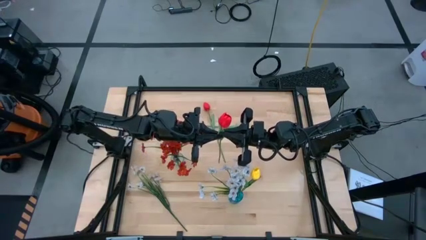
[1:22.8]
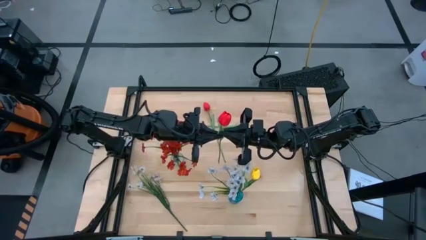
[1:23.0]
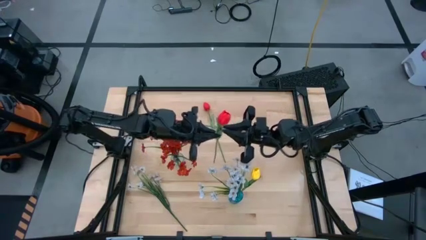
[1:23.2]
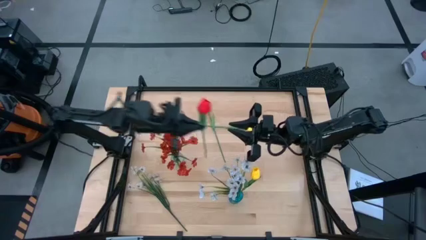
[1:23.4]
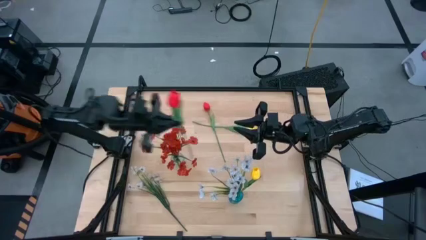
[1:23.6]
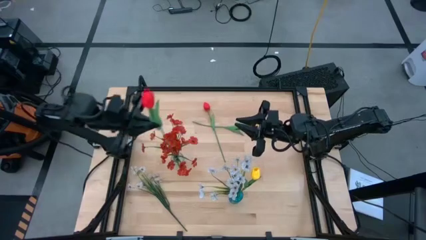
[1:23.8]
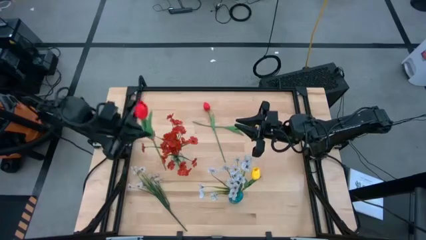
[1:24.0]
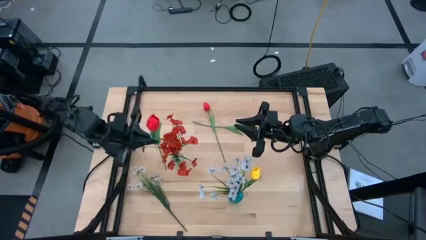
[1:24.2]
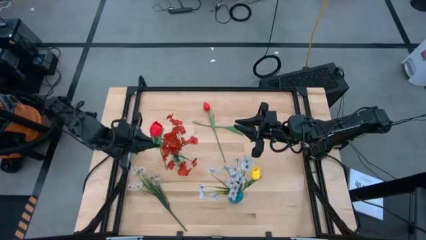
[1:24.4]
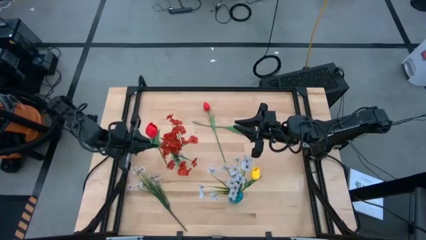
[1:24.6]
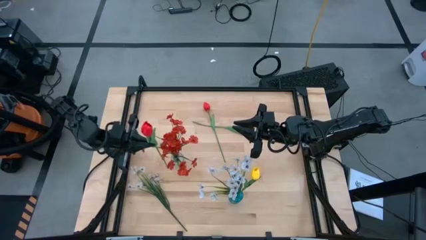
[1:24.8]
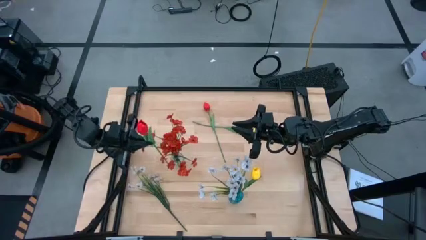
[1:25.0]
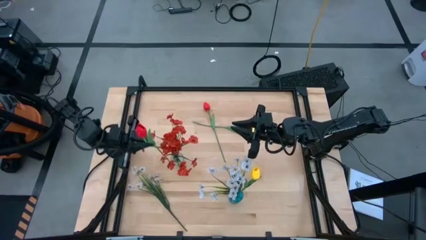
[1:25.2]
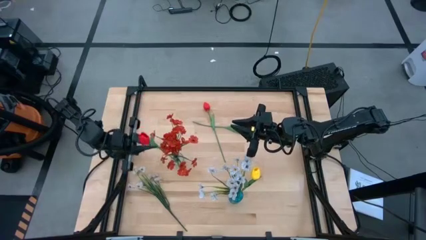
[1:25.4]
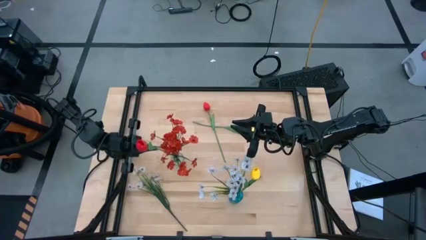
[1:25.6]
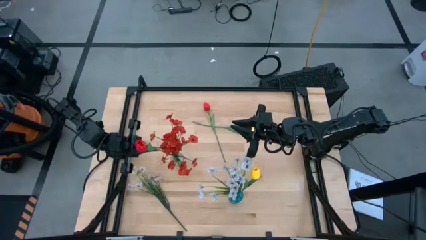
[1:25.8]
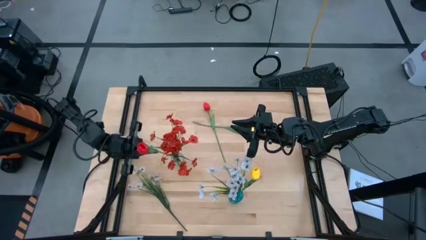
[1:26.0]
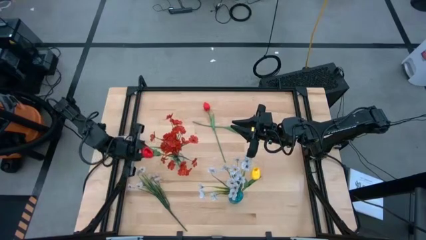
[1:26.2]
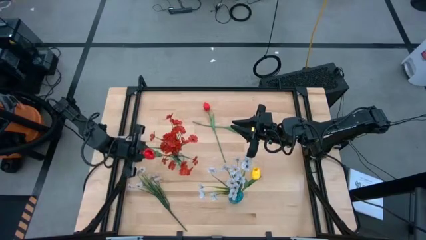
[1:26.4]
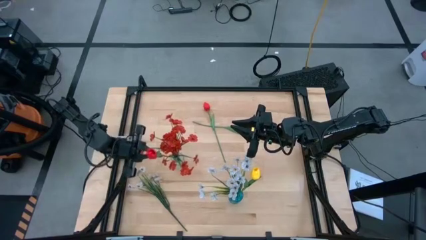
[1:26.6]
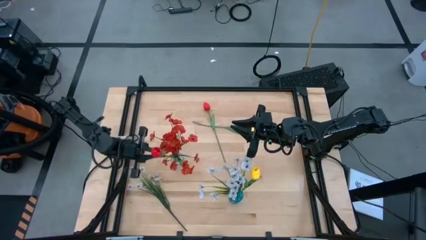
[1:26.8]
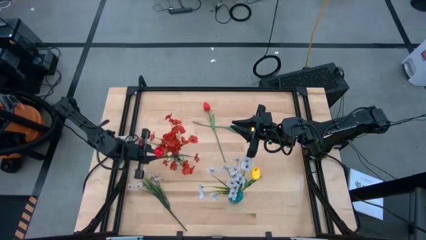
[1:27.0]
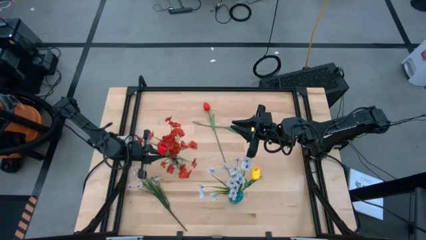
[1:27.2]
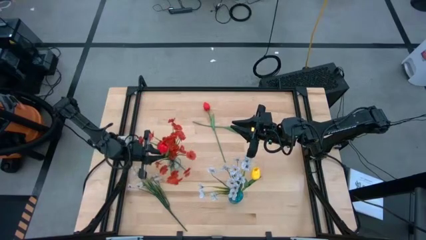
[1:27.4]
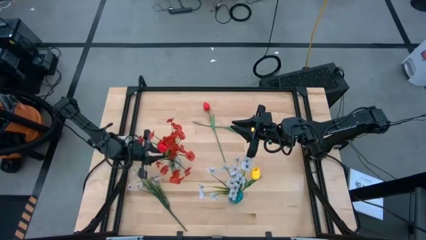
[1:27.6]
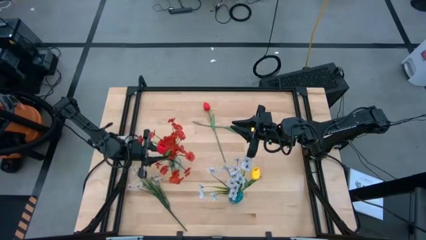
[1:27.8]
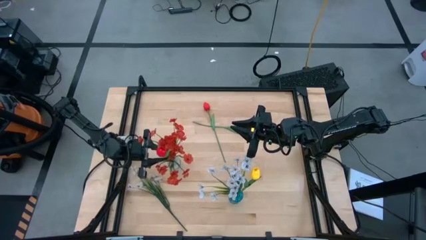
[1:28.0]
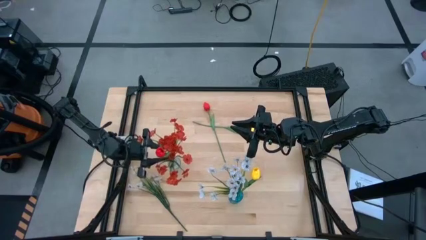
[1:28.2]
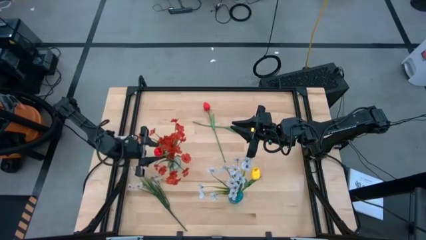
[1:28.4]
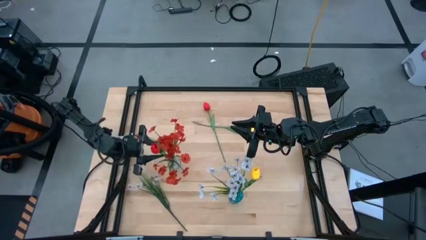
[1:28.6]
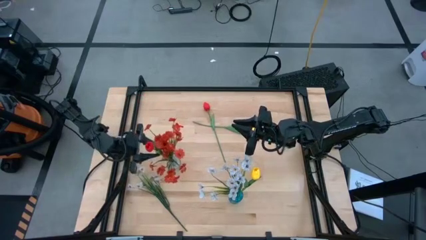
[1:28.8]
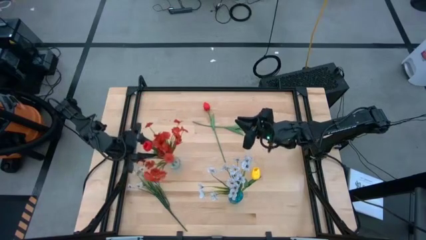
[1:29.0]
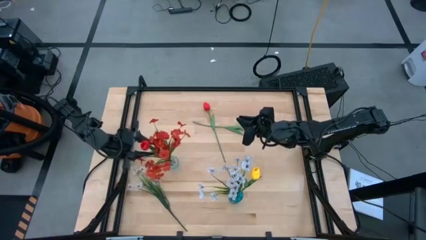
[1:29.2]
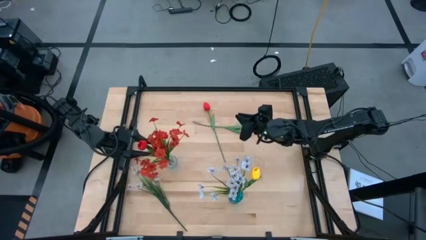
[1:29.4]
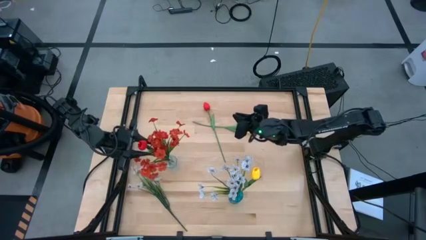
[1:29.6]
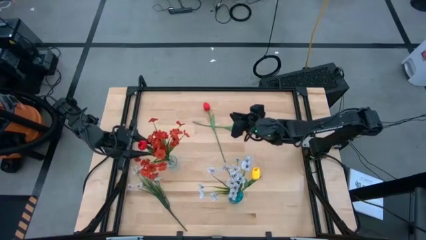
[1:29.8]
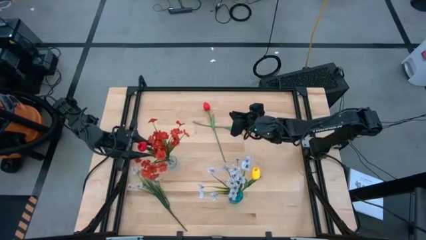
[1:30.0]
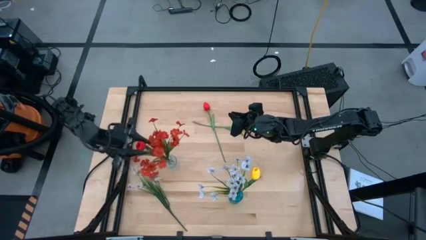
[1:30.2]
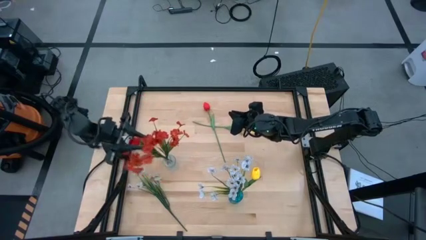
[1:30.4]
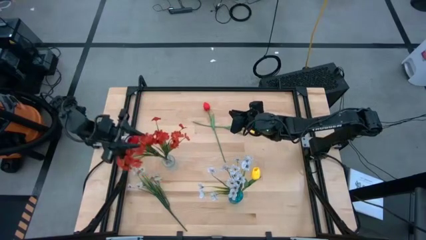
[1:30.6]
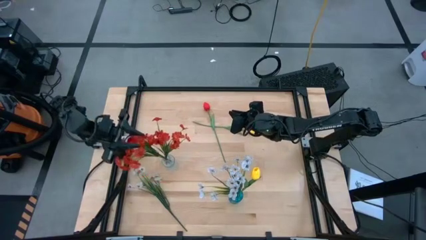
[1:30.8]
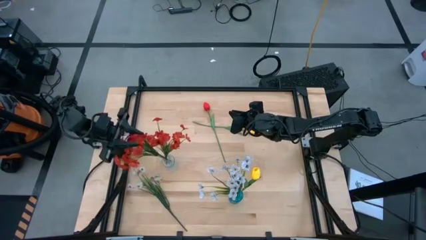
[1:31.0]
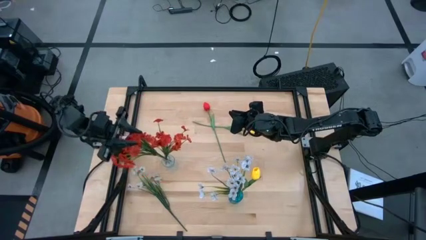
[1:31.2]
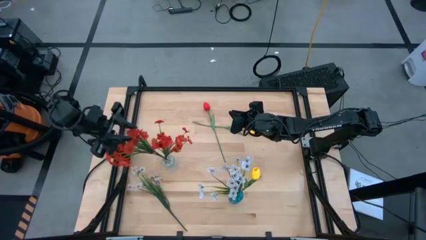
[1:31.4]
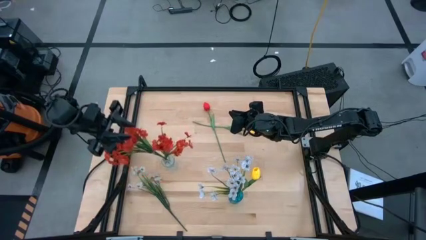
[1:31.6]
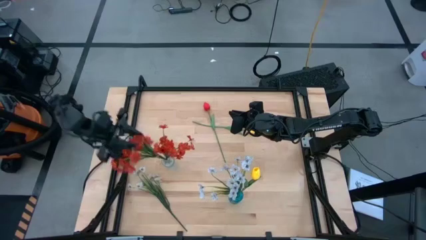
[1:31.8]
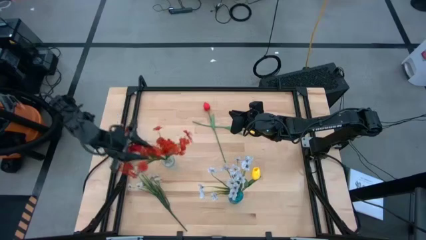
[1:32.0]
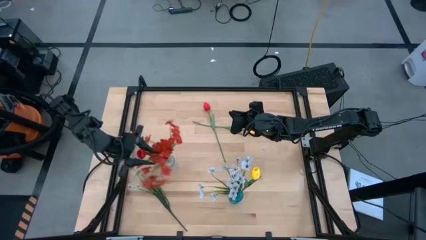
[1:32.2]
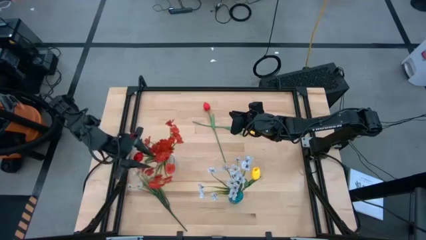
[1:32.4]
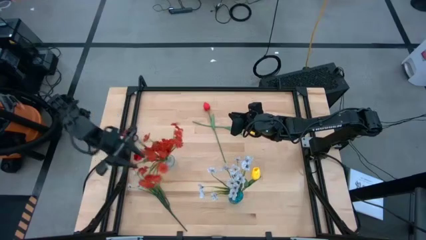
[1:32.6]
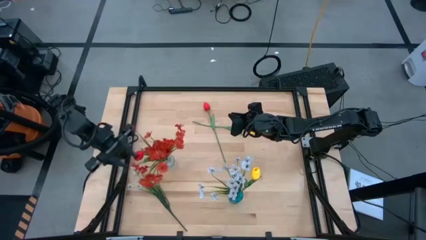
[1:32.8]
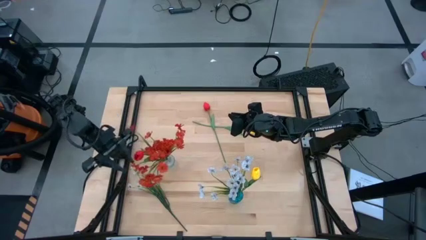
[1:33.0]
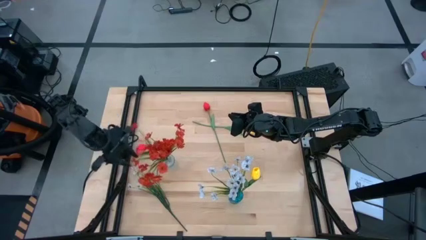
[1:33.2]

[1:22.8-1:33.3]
Task: Sort flowers into vase by color
Put the right red tulip into the transparent vase

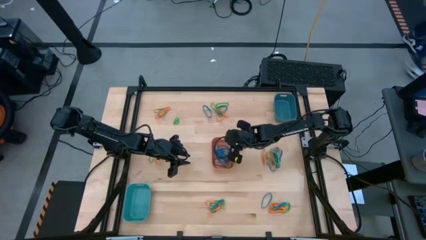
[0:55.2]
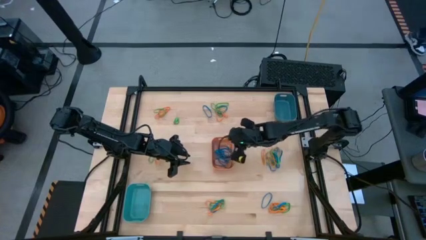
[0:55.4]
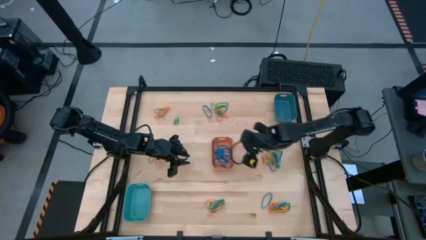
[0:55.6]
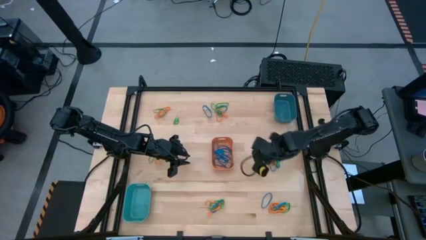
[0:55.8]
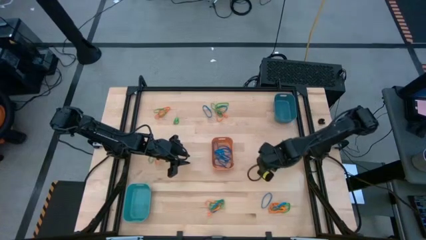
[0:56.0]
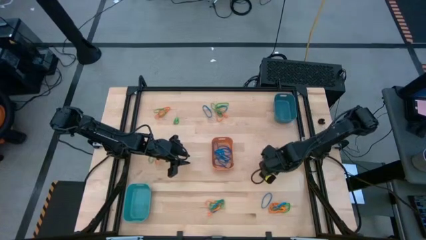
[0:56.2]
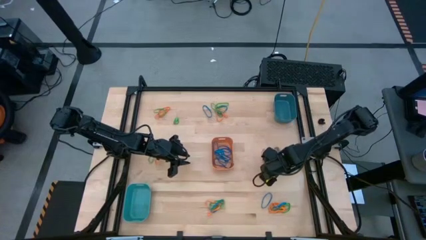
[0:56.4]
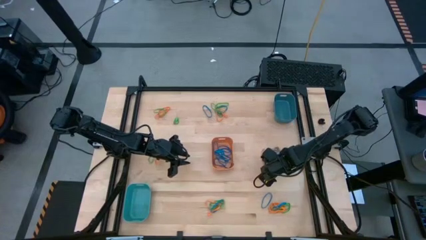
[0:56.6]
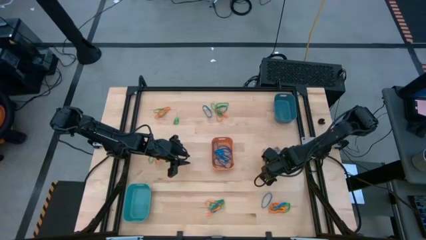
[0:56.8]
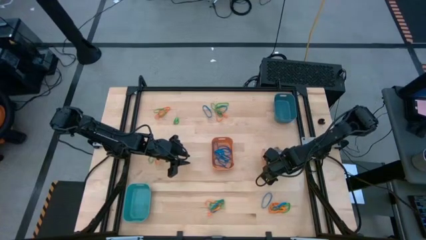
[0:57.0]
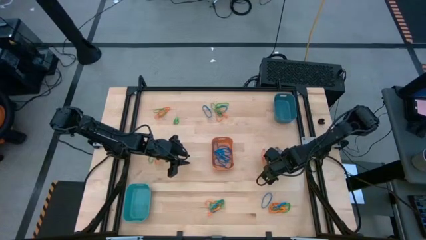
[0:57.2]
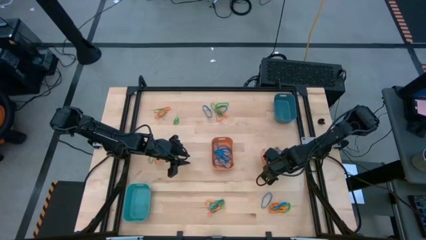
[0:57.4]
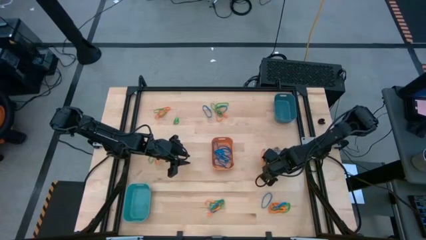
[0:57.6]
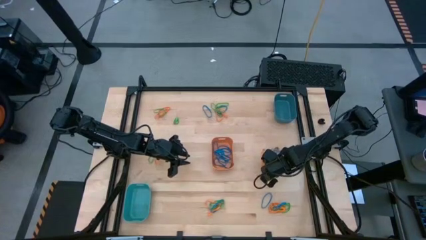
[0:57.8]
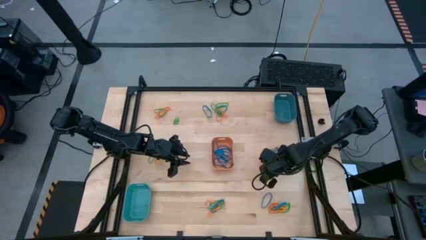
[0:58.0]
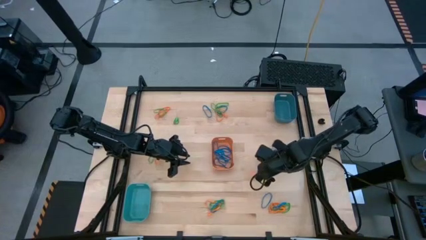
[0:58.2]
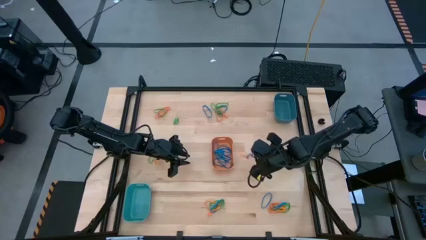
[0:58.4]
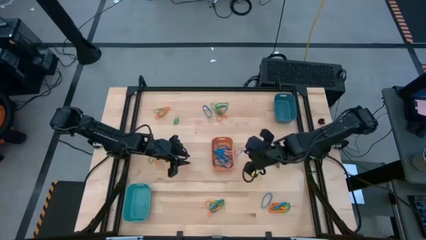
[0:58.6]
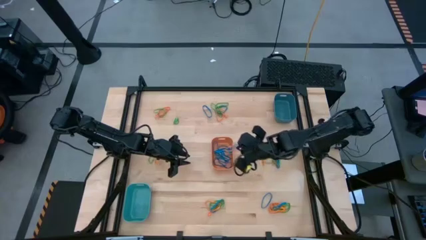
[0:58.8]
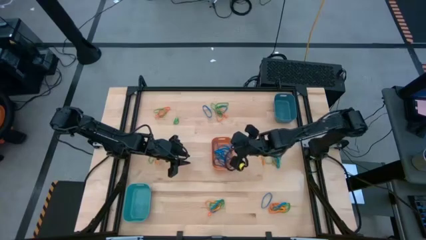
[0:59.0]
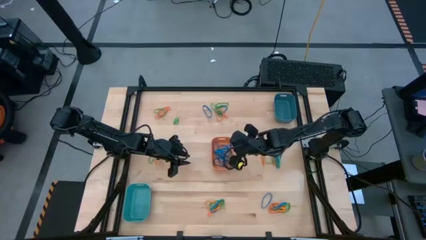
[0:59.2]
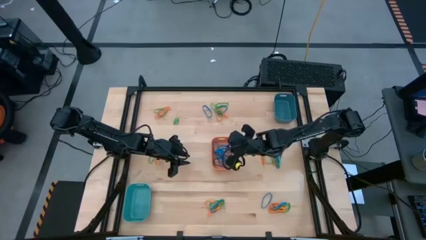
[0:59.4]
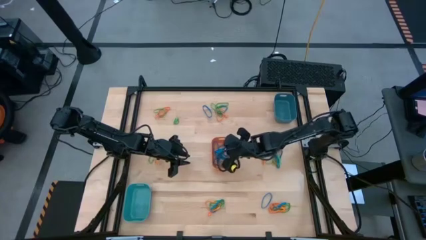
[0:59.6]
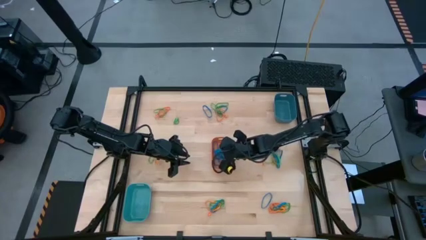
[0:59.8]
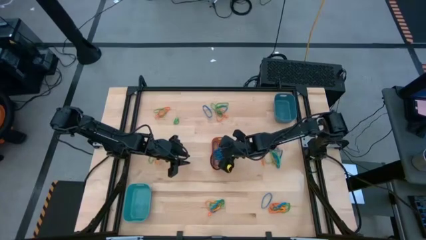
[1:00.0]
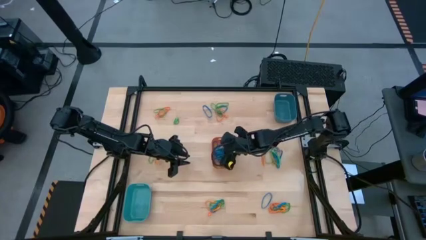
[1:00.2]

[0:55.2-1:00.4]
Task: Sort rubber bands into baskets
Put the blue rubber band into the orange bin

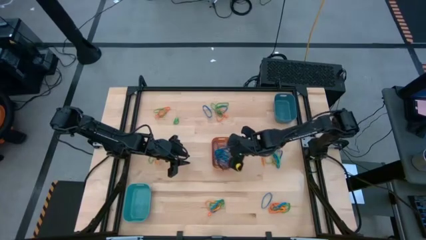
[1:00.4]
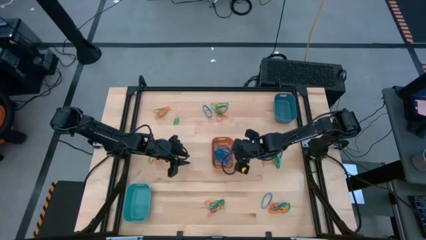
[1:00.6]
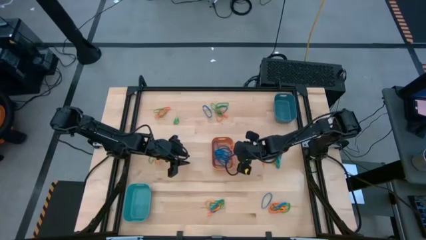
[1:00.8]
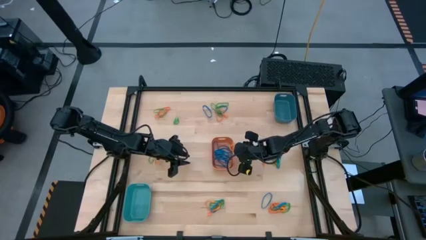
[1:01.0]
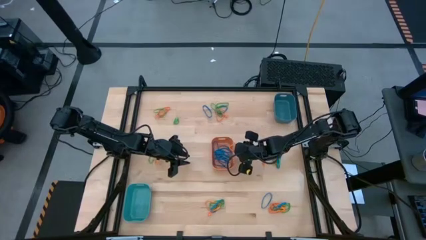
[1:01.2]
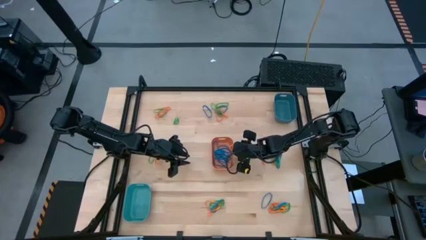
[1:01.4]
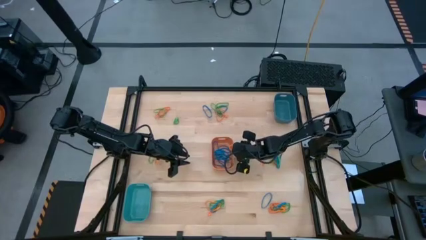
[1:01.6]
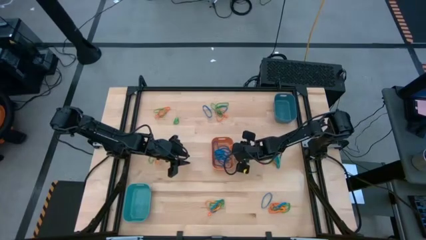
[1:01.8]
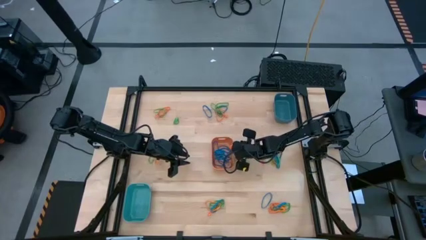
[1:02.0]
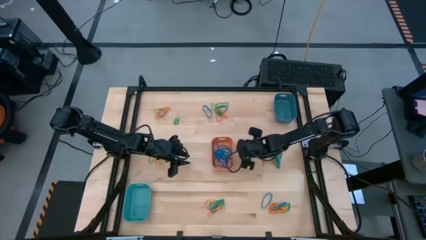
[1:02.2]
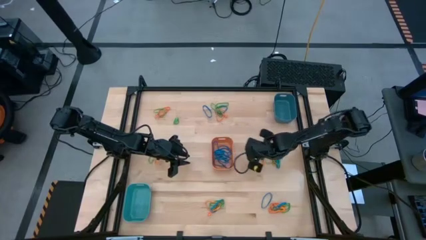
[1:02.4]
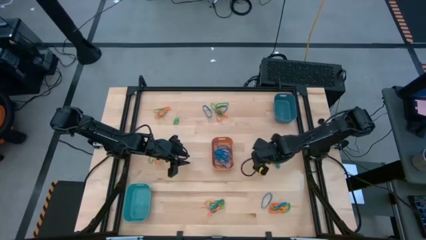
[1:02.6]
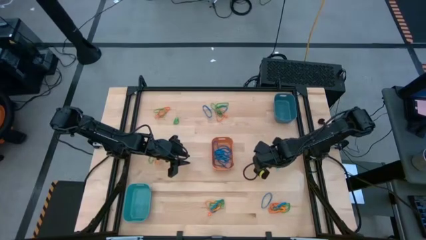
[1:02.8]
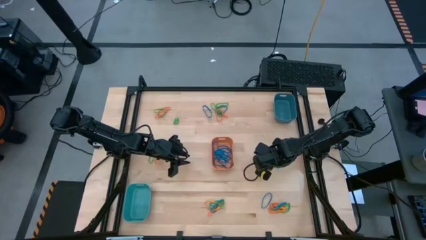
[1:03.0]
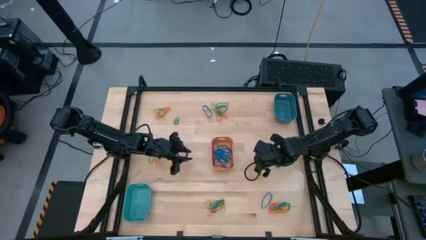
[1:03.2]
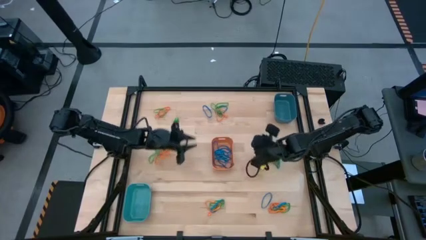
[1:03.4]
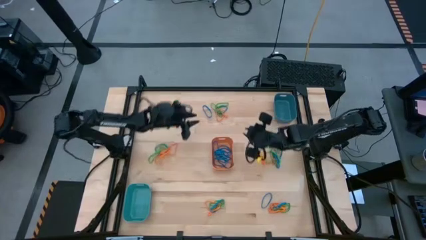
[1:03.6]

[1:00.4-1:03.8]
Remove the orange rubber band from the orange bin
